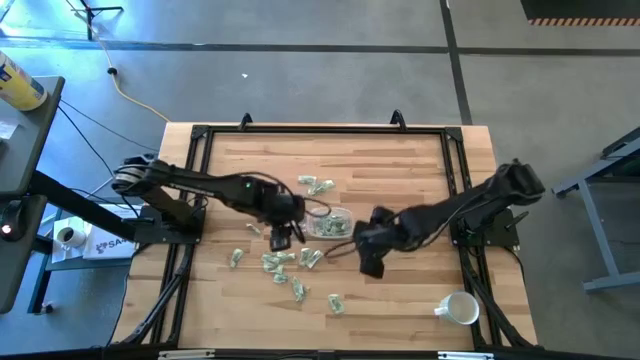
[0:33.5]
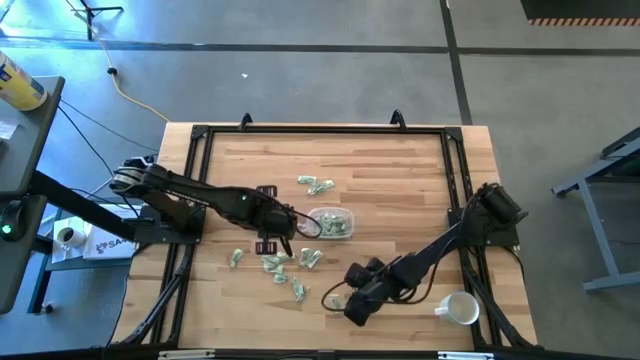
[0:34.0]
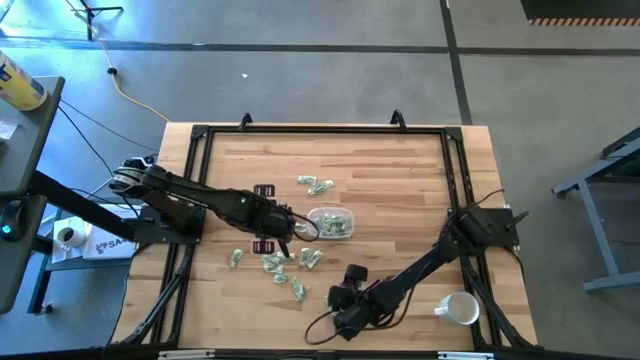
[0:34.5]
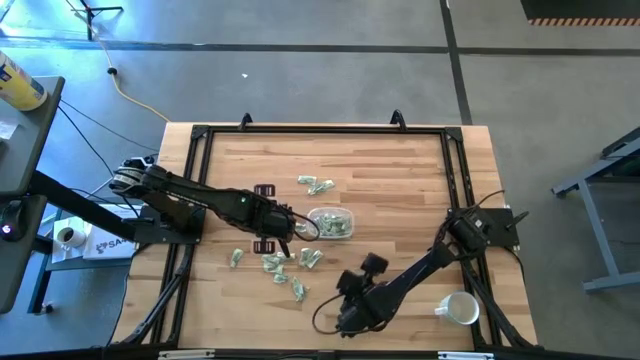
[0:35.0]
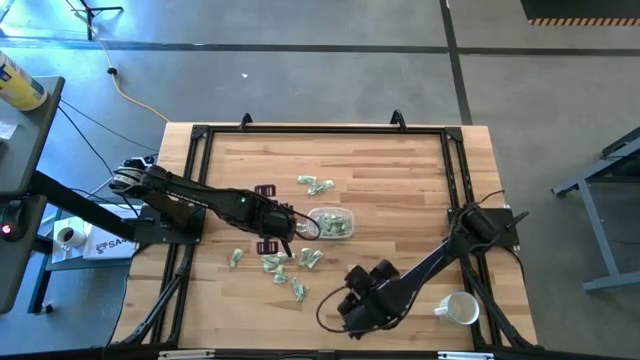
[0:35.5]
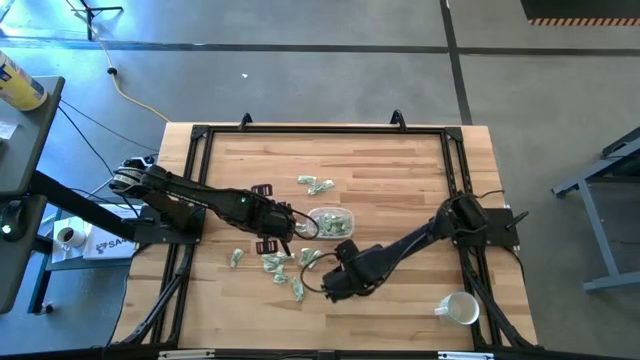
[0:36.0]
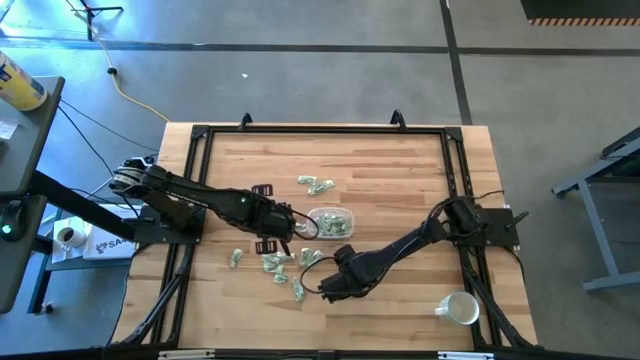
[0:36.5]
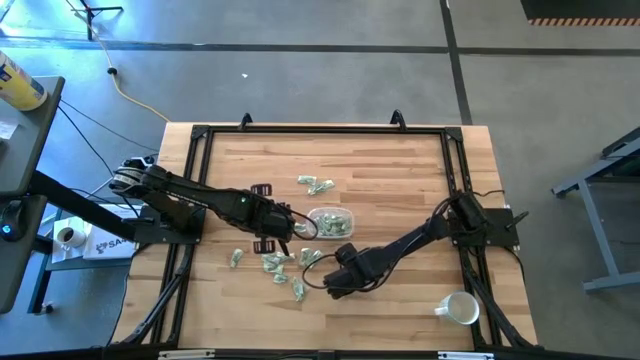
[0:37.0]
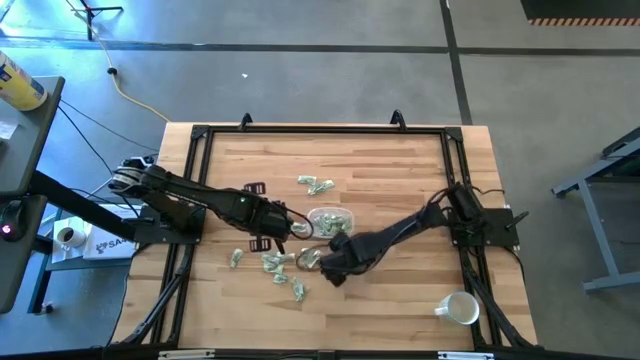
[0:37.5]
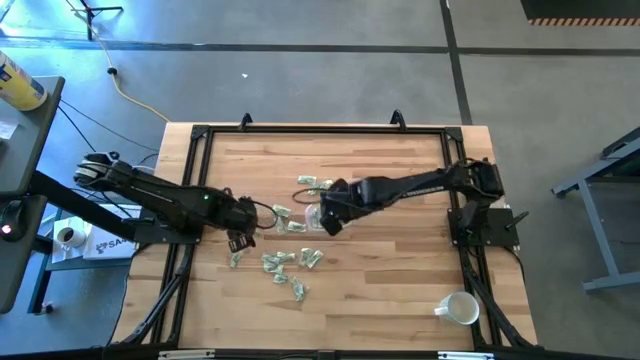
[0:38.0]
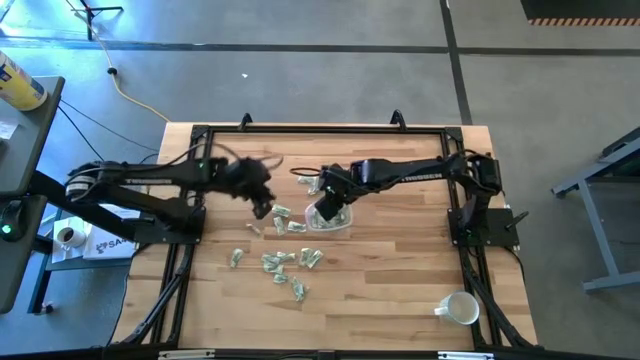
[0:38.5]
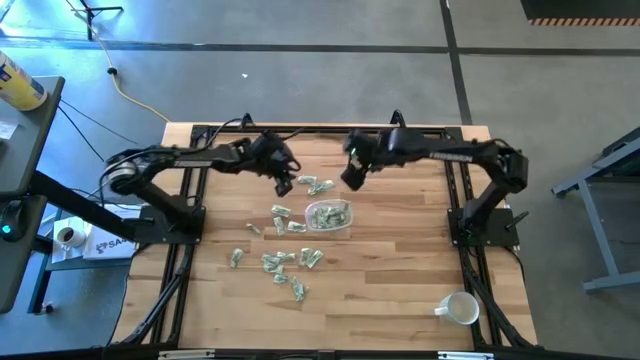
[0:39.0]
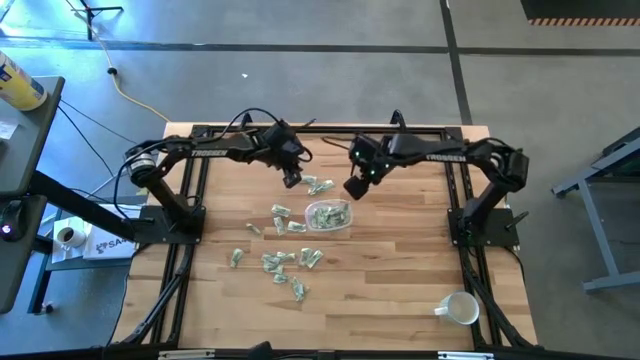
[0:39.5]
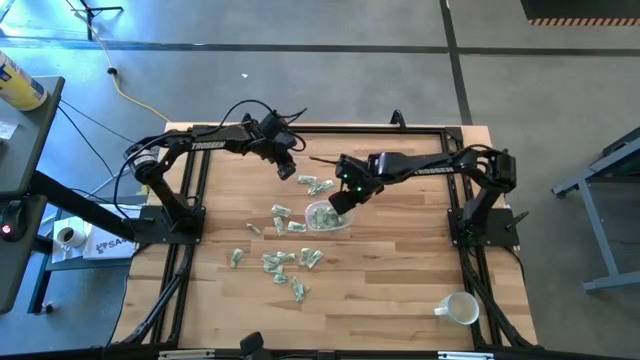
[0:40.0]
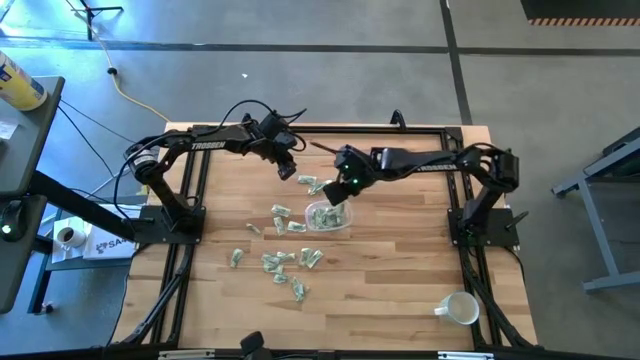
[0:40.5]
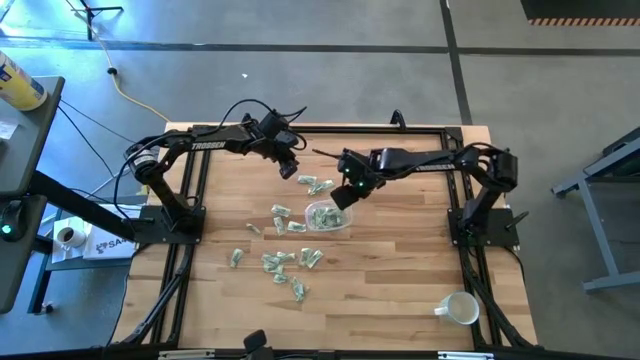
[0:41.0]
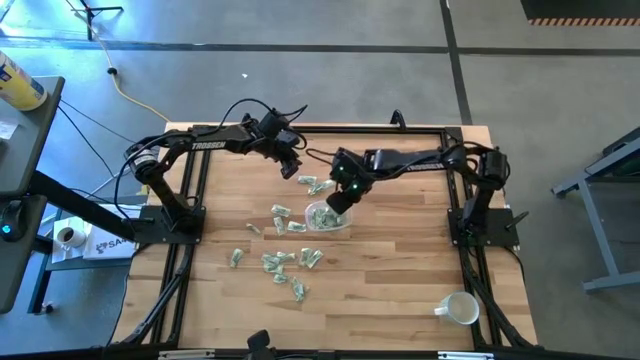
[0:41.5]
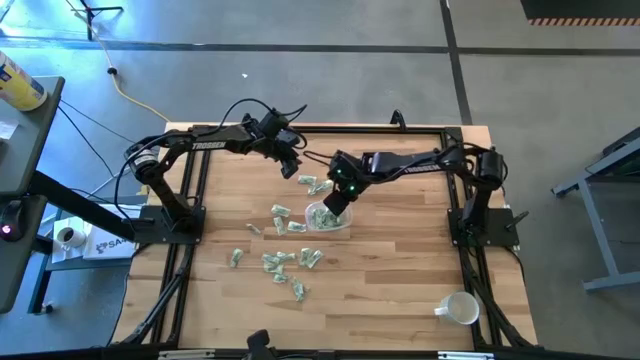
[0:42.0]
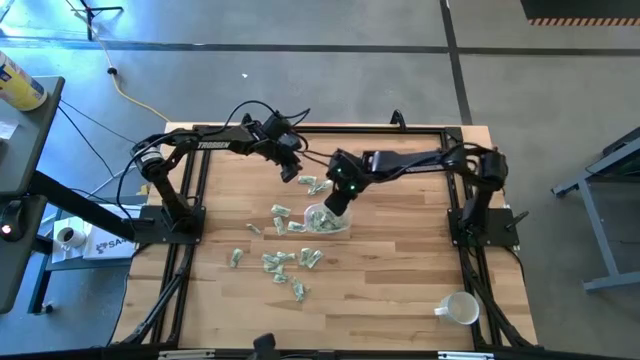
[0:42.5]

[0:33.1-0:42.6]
Task: Pick and place Stevia / Truvia into bins
Put the stevia packet into the transparent container

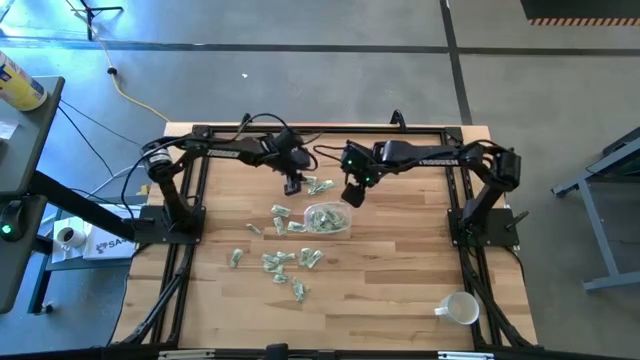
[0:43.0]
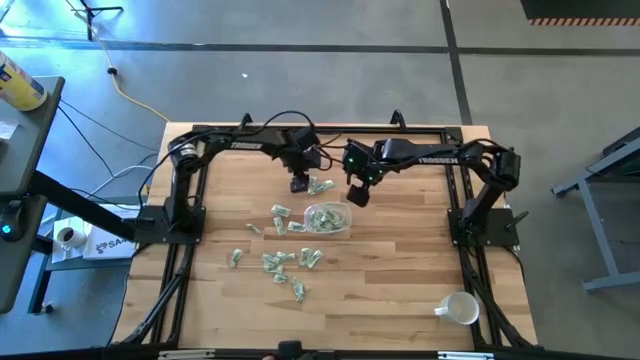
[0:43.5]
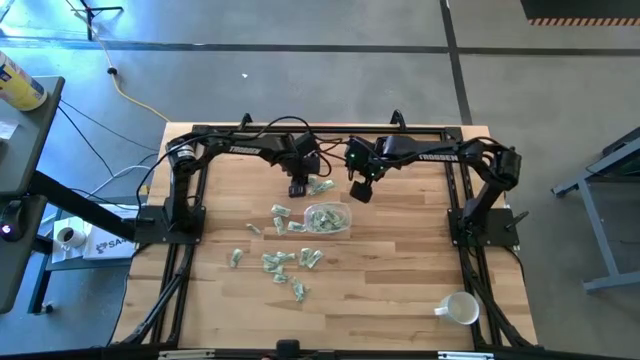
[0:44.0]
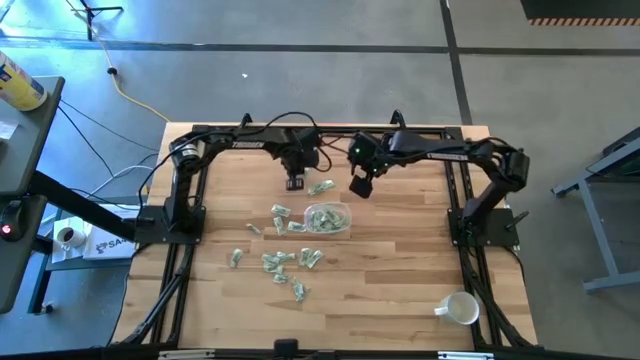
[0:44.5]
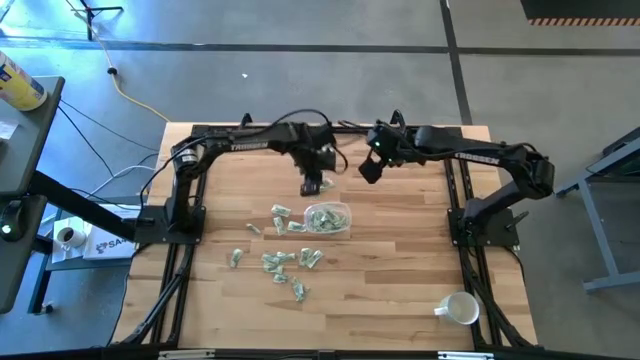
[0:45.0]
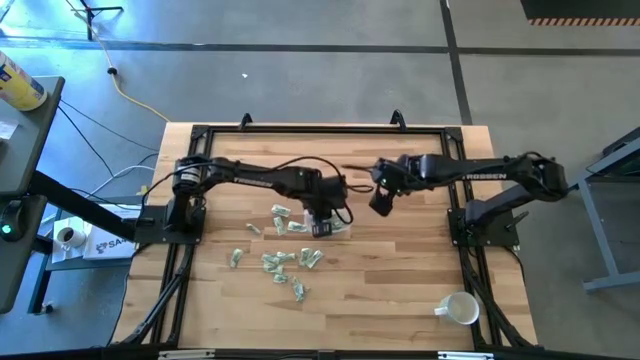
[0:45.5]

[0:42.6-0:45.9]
Put the stevia packet into the transparent container

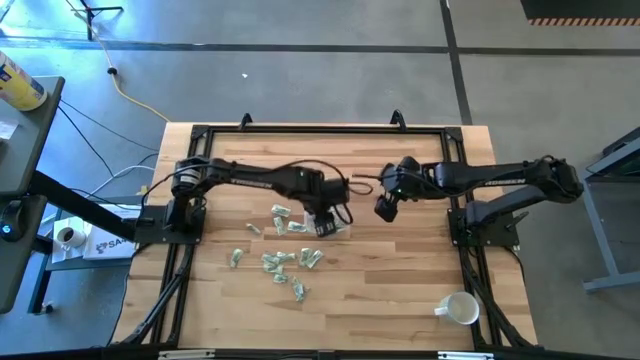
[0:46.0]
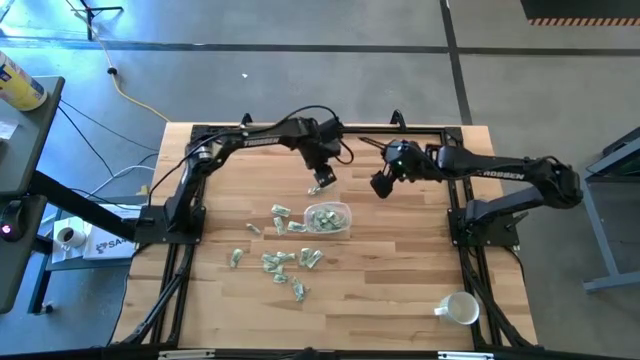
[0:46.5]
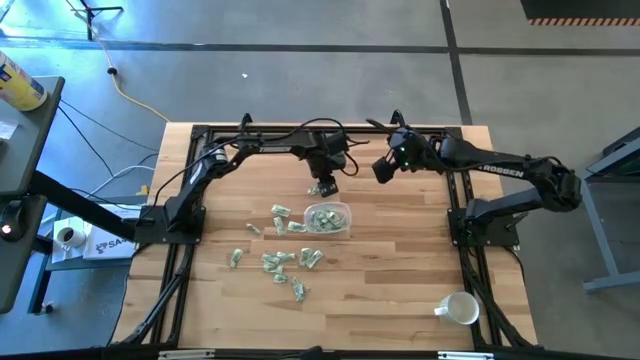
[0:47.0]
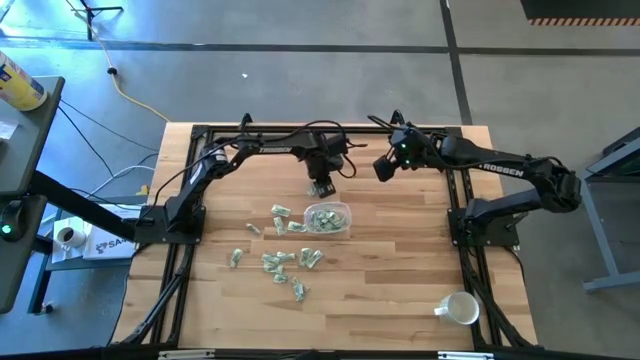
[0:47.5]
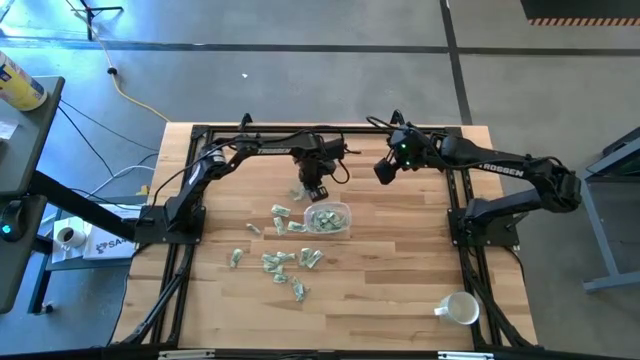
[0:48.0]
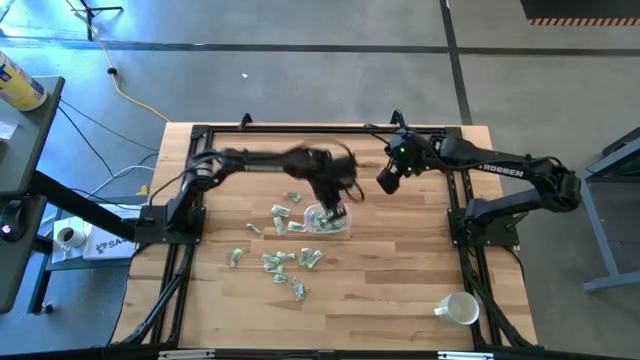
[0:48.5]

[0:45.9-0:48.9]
Put the stevia packet into the transparent container

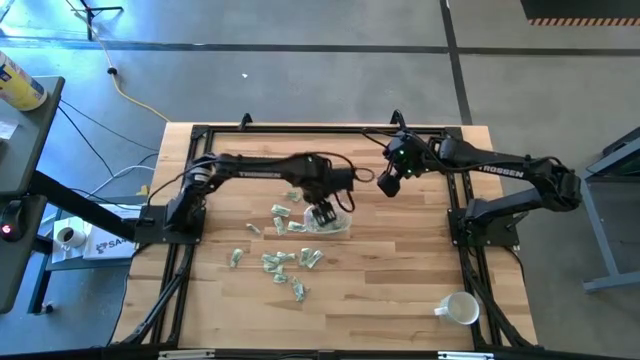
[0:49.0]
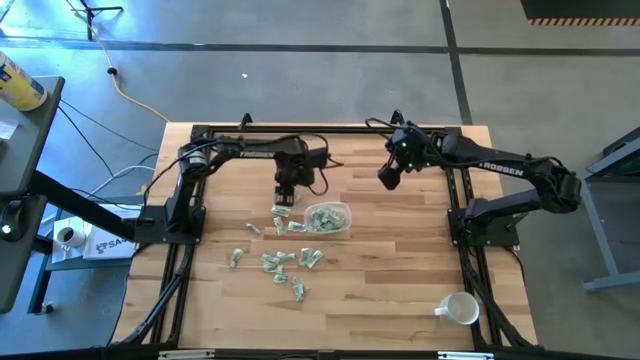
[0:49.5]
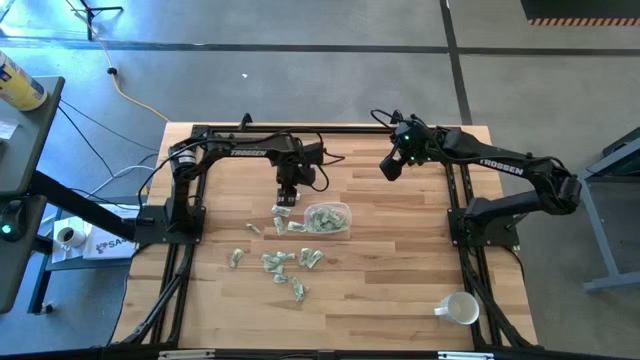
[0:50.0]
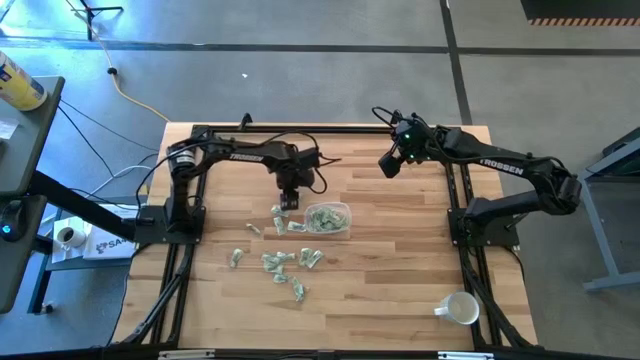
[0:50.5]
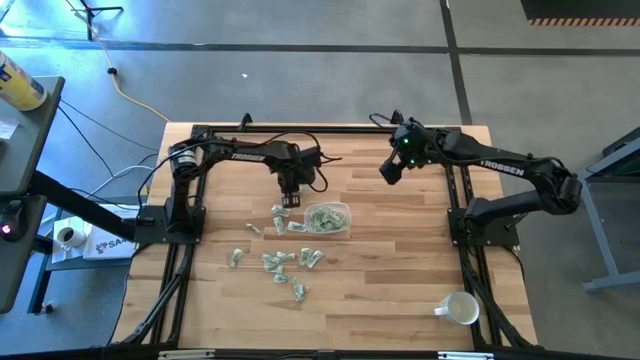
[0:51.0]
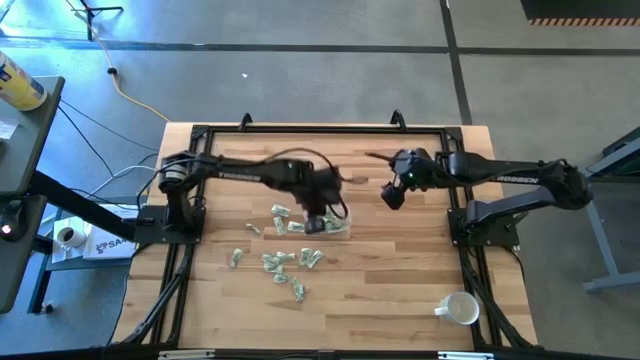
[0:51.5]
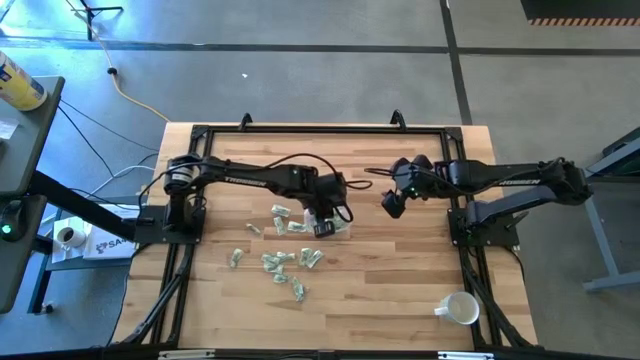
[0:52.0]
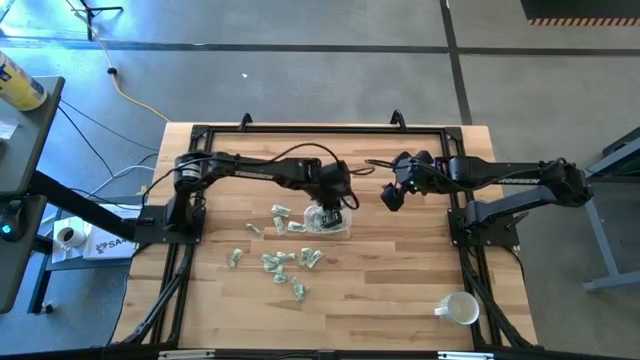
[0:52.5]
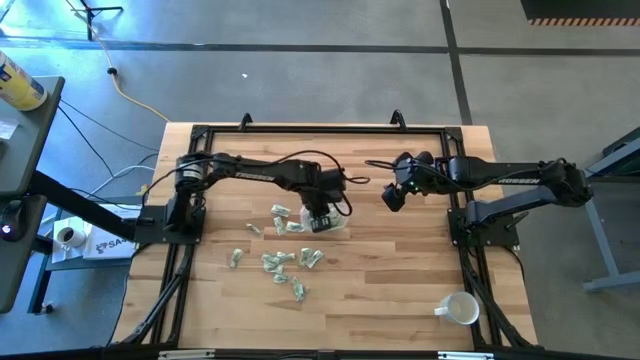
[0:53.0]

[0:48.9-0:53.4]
Put the stevia packet into the transparent container

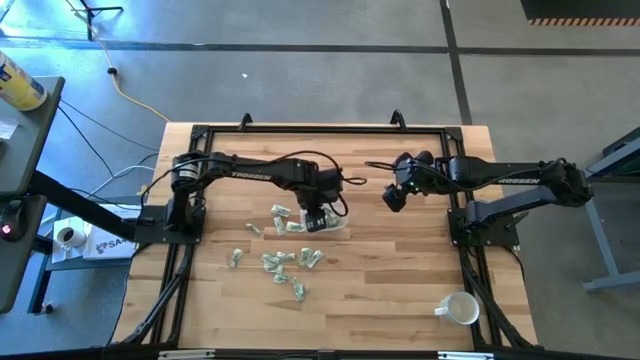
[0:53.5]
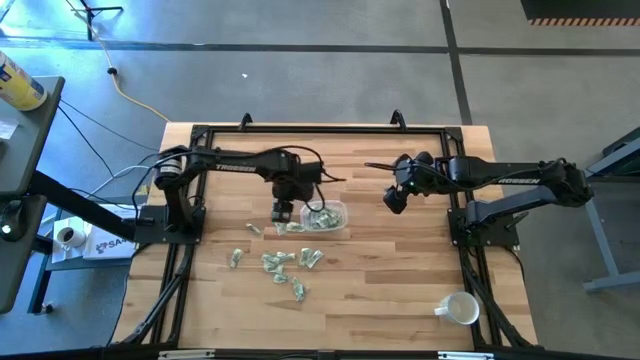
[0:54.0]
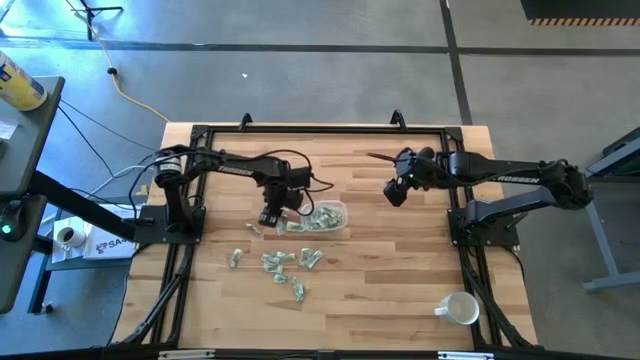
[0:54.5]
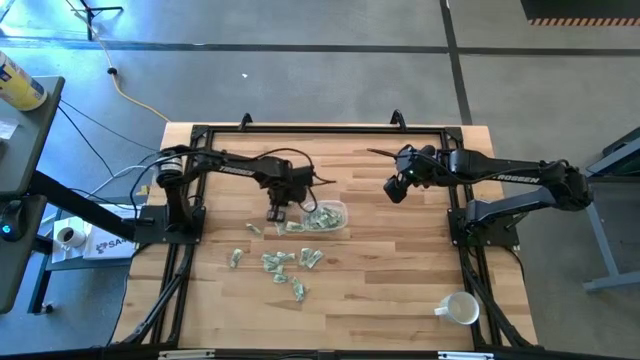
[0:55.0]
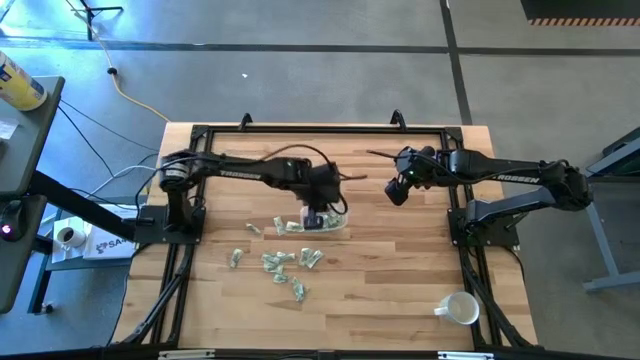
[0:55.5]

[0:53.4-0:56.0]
Put the stevia packet into the transparent container
